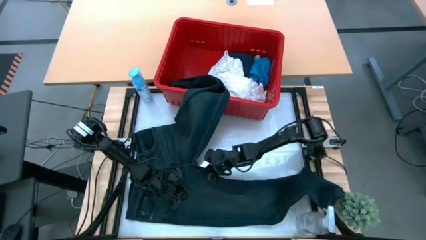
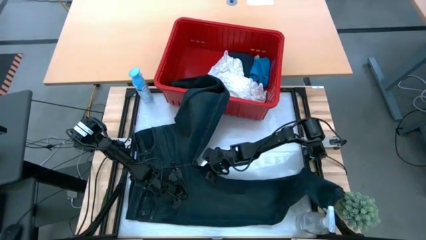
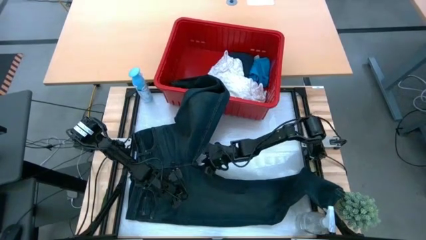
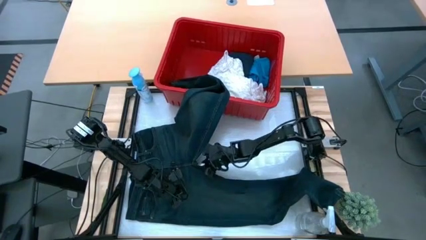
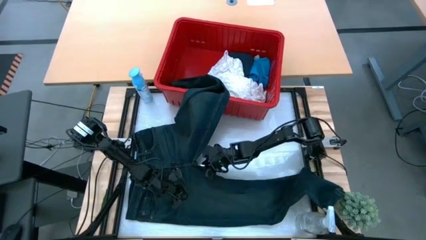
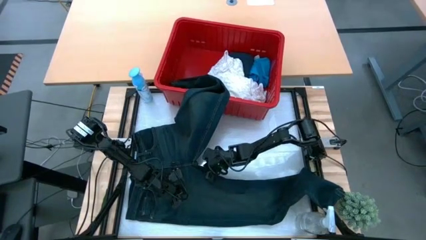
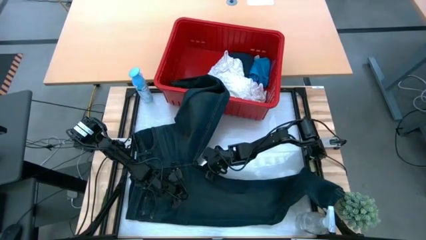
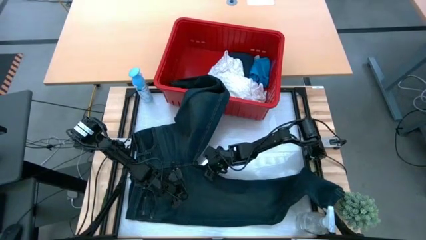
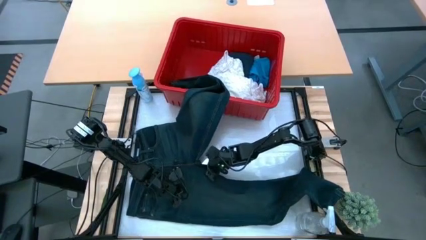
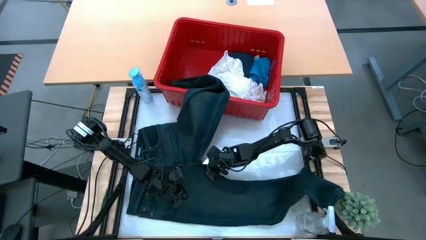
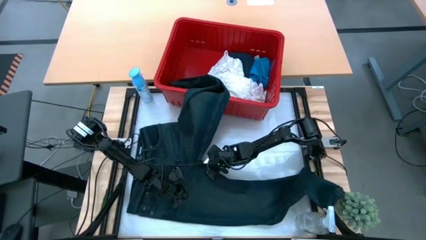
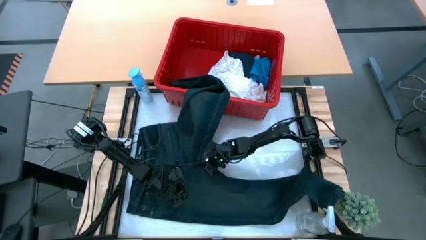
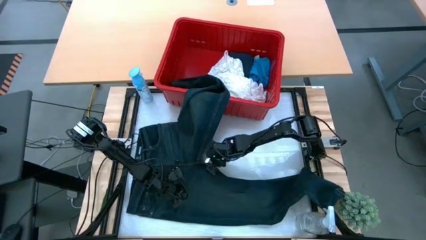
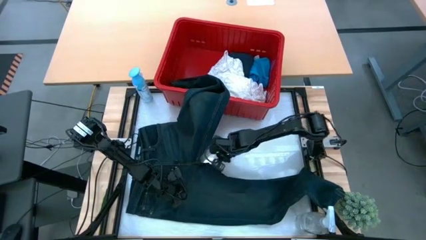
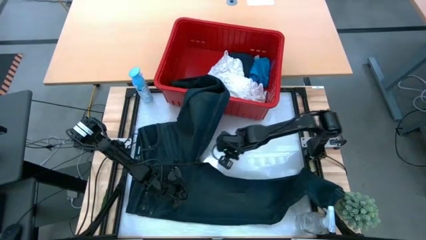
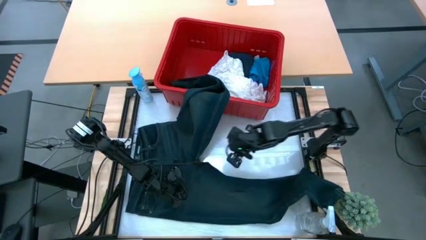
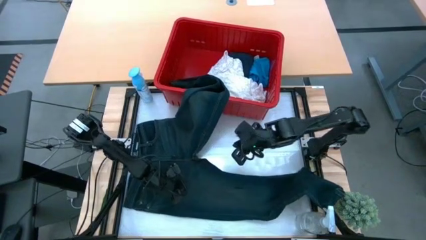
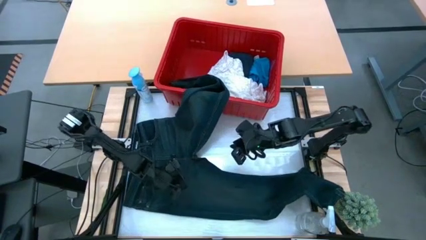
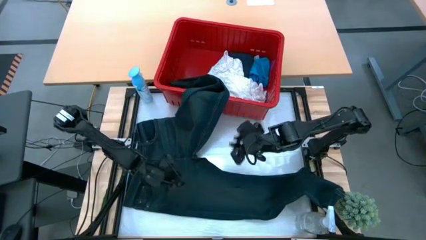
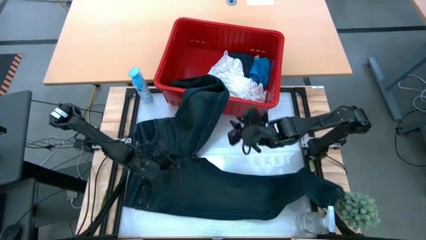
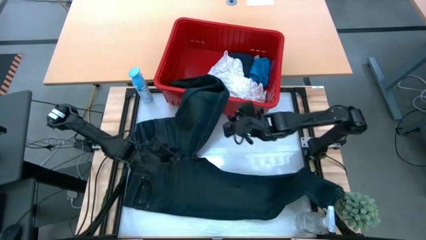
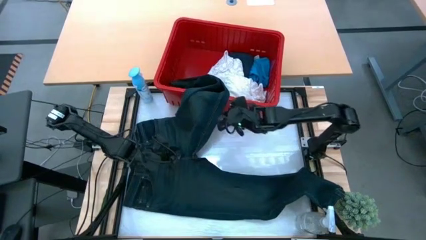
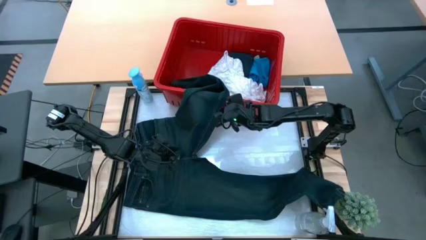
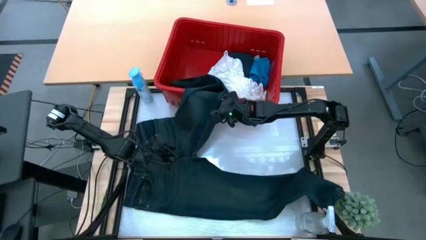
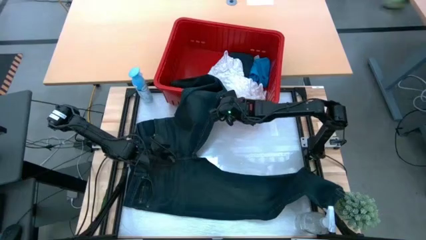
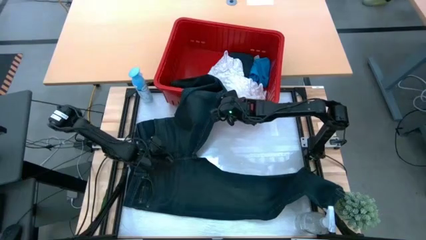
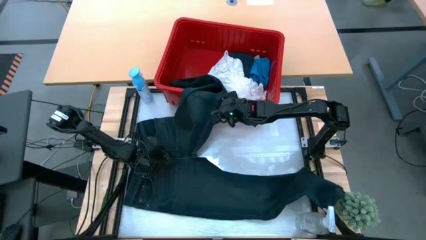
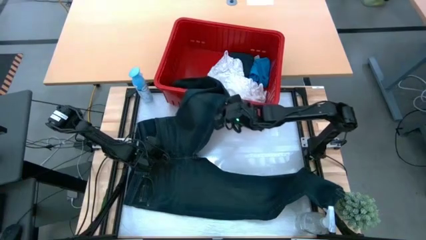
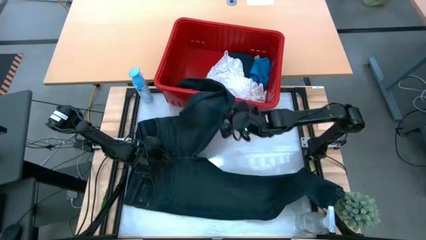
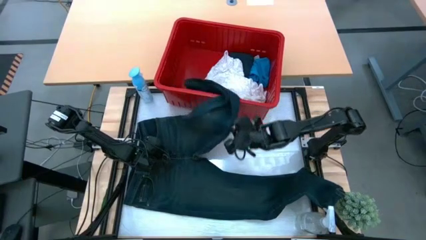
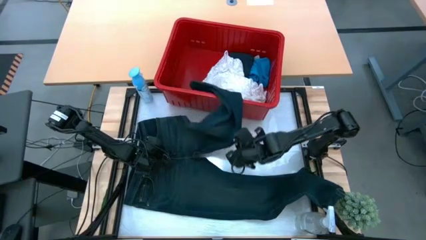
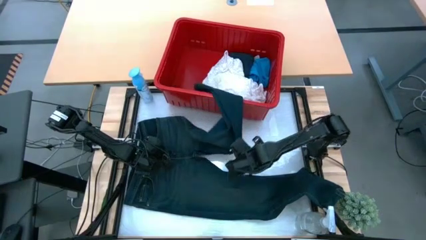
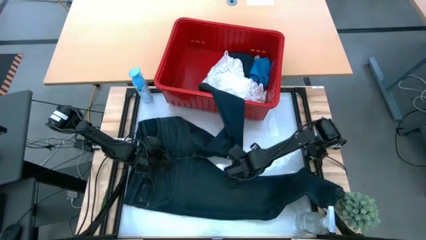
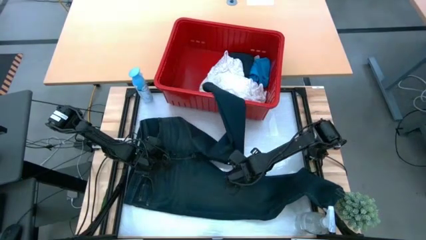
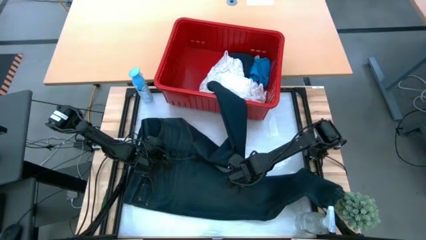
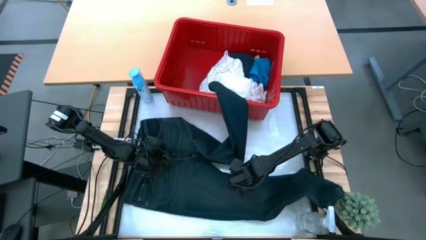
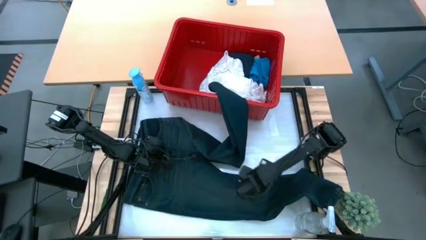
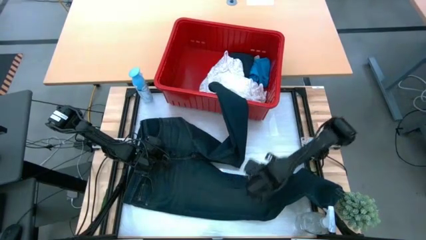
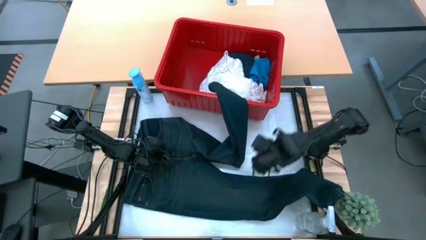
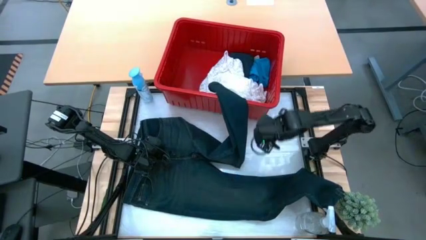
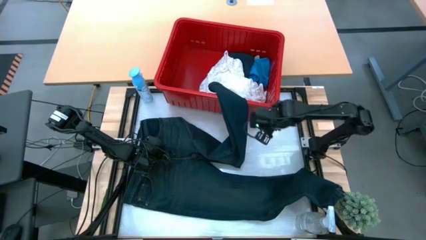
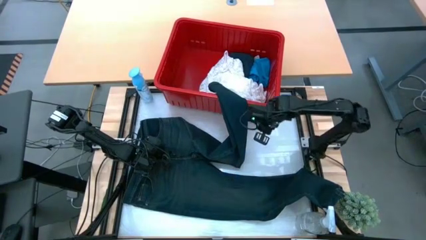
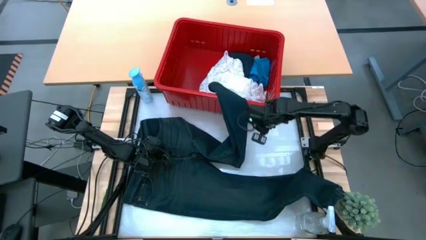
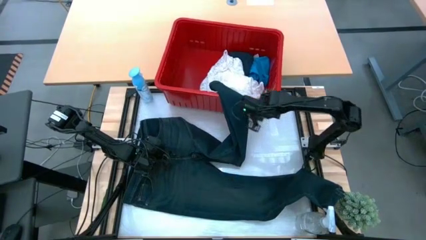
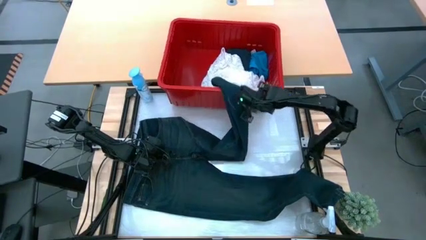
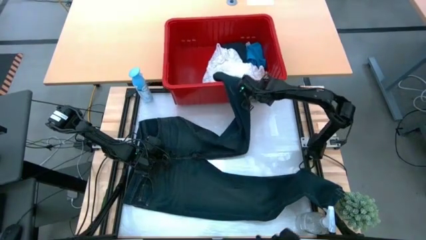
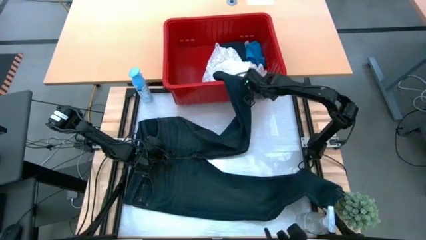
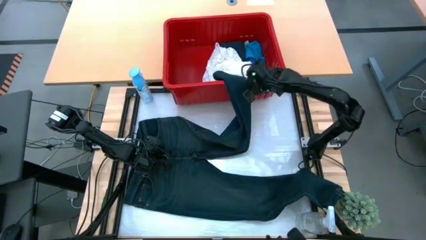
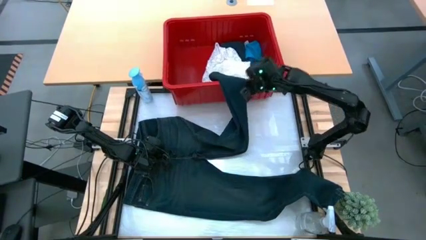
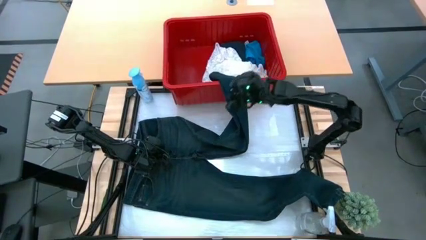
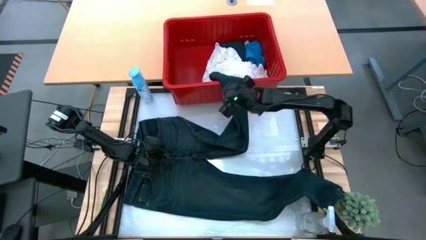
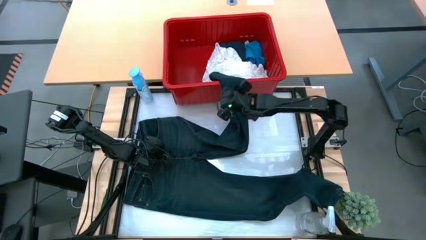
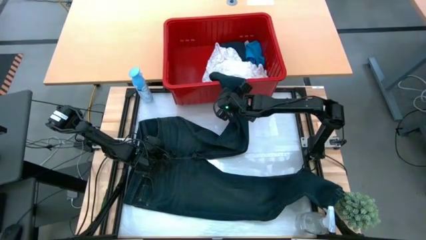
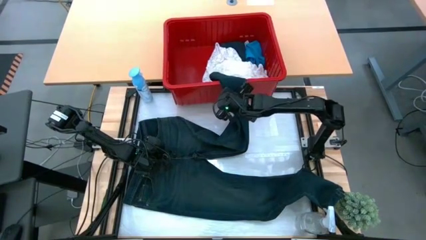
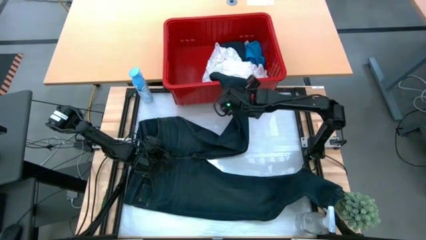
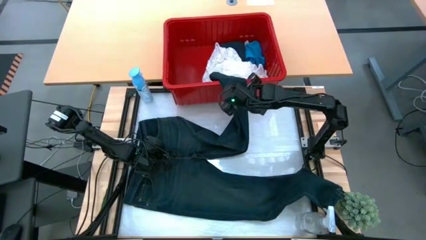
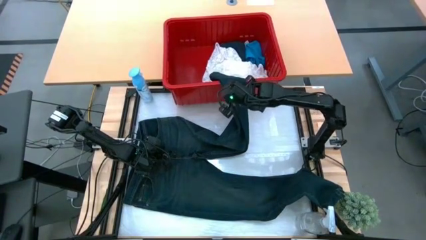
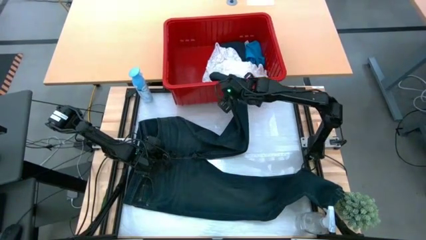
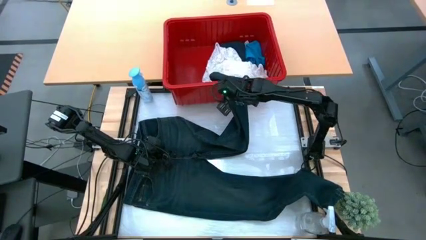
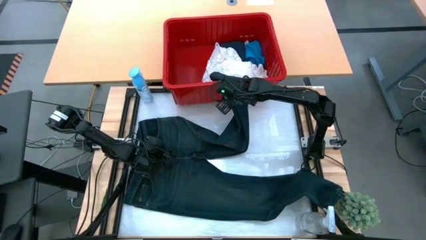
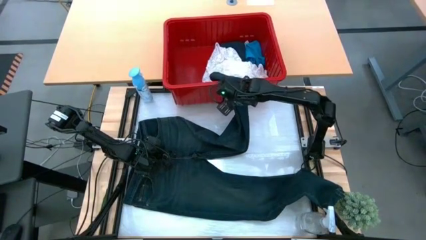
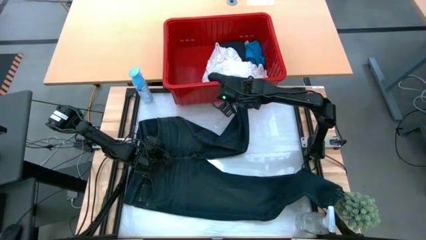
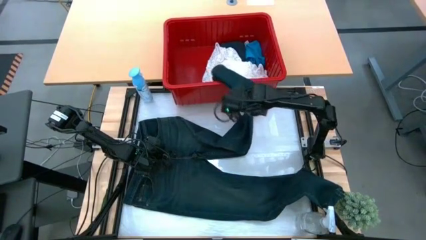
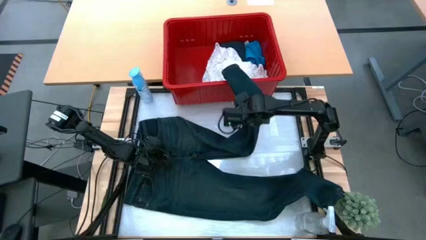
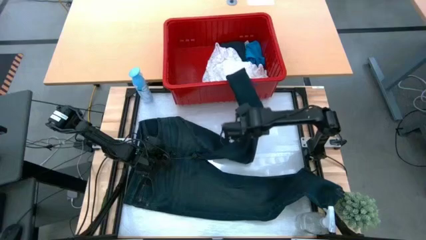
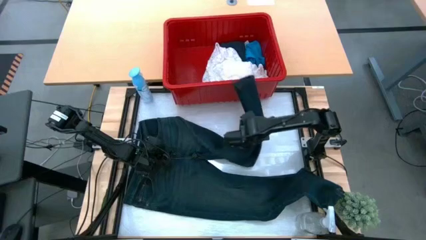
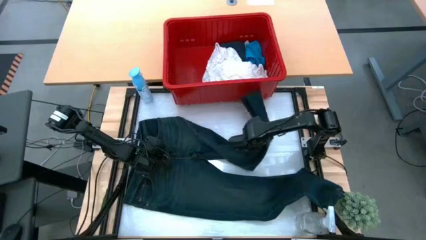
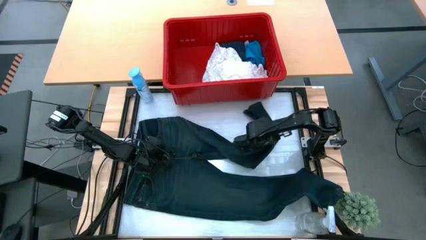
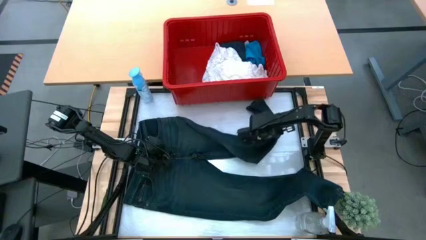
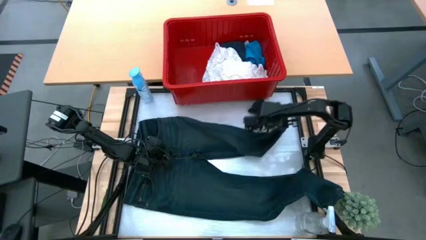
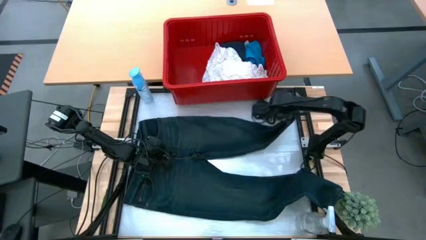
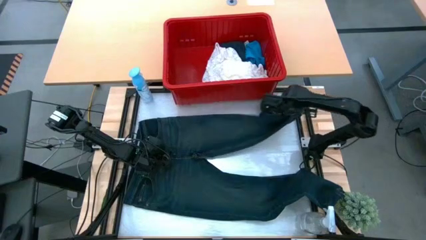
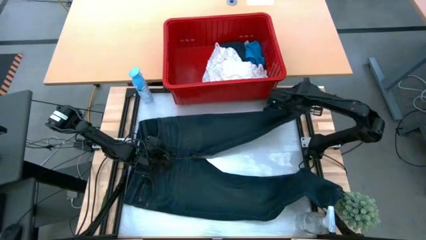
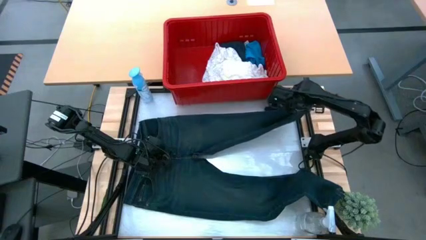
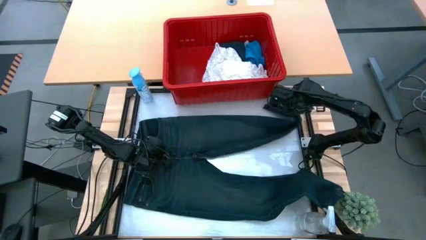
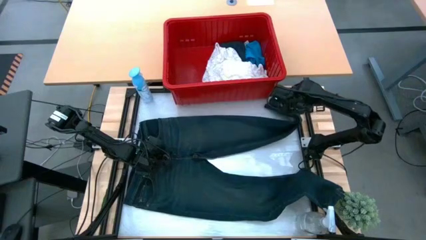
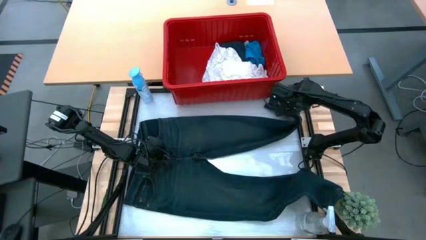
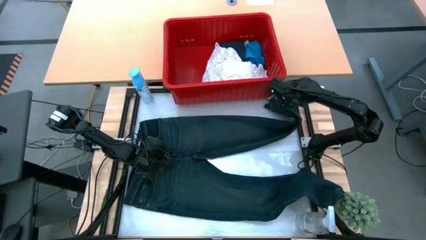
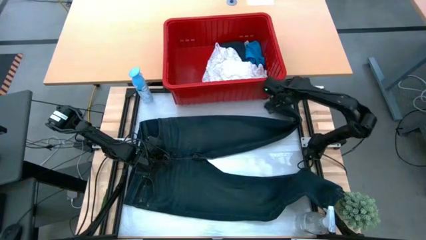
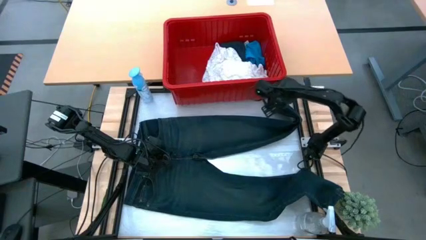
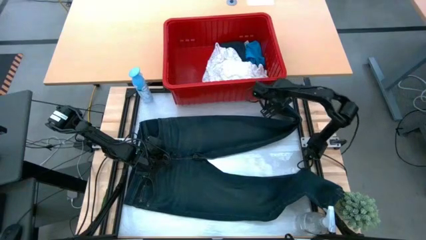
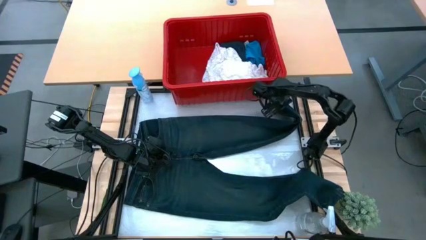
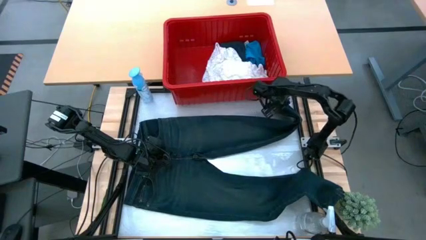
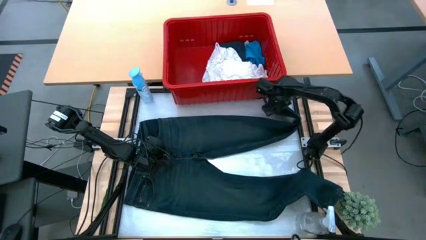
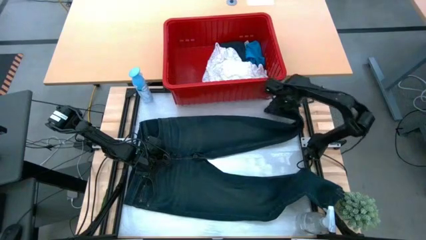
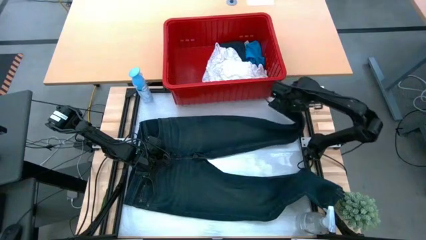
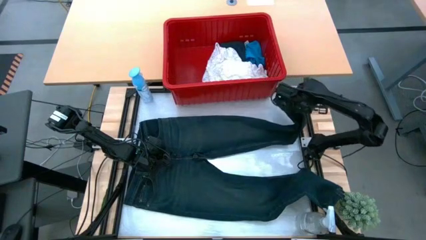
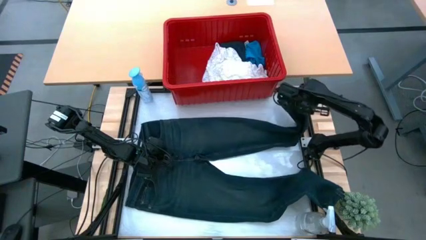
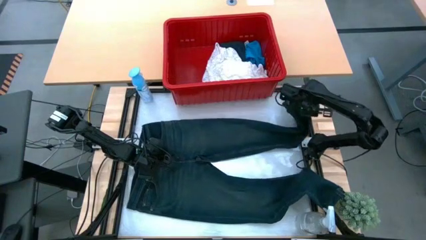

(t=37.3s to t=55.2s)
Task: Fold Laundry from Bin
Fold the black pants from the red bin
